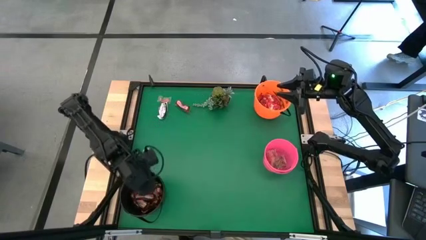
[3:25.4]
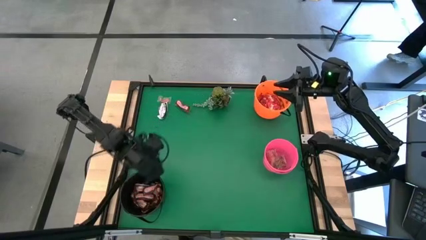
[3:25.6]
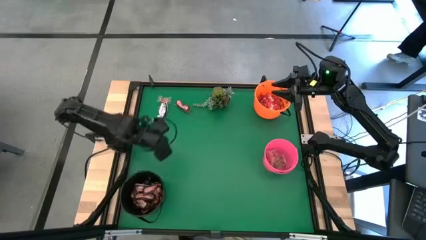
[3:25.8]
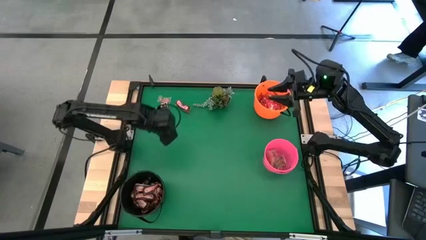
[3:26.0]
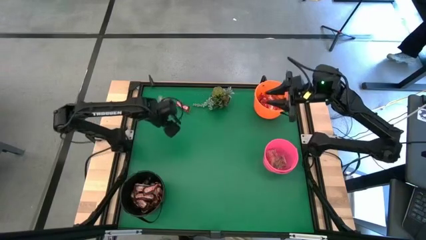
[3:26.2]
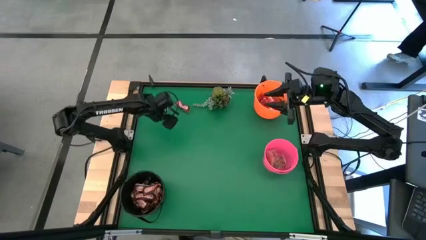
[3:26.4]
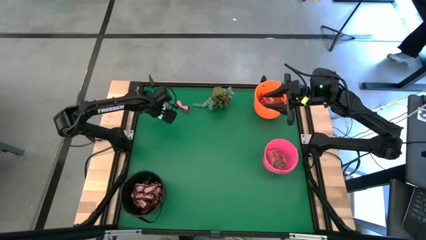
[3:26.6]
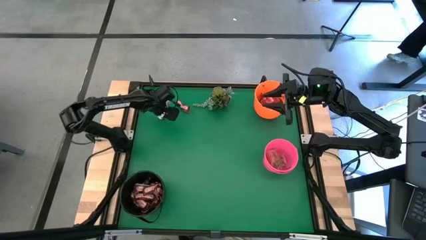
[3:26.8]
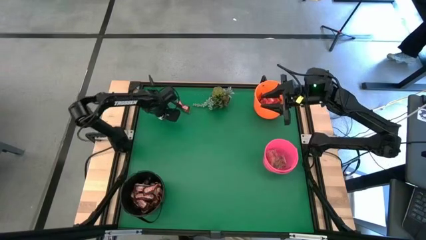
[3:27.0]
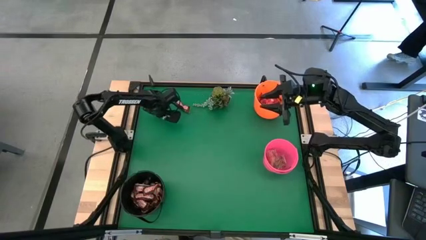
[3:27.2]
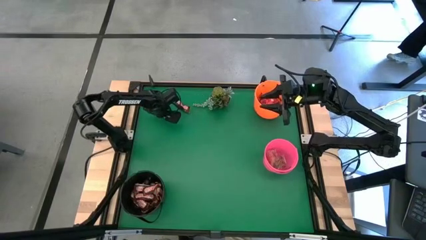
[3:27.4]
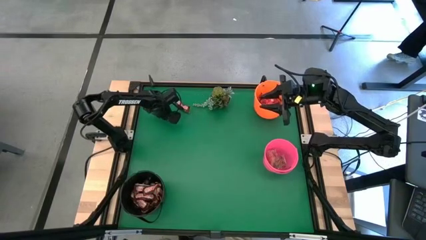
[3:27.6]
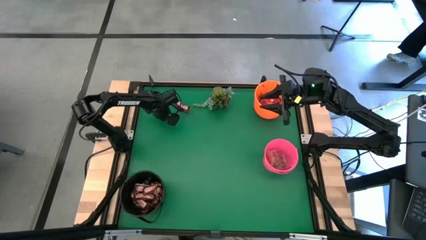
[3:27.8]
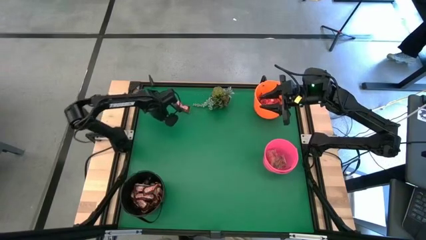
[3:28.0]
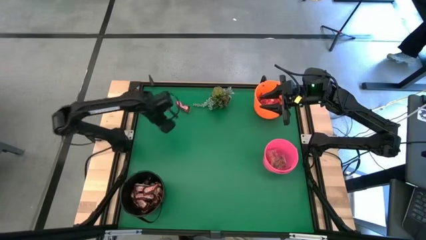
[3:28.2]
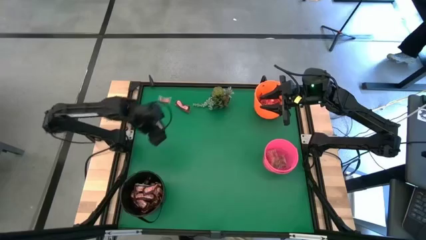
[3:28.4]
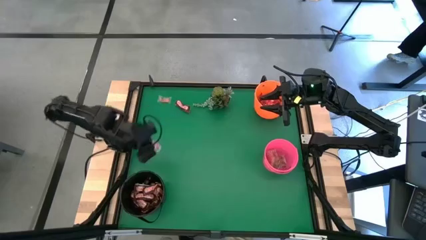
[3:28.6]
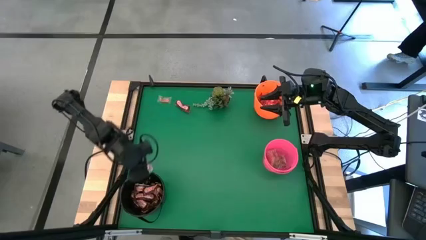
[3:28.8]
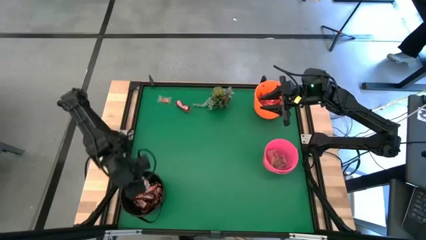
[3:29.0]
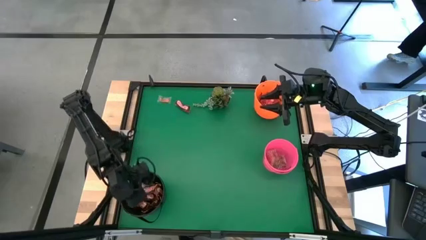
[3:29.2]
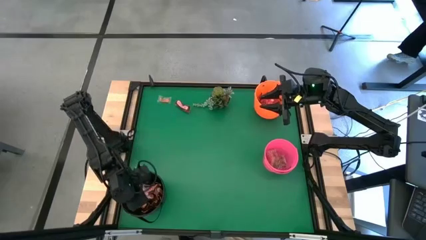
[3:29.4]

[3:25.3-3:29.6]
Task: Sort candy
Put the brown chocolate bar into the black bucket

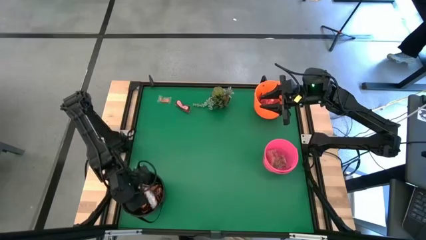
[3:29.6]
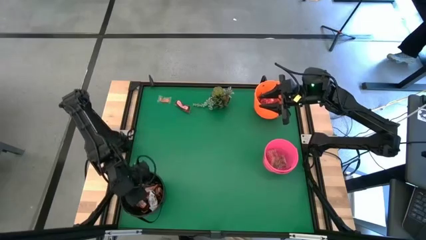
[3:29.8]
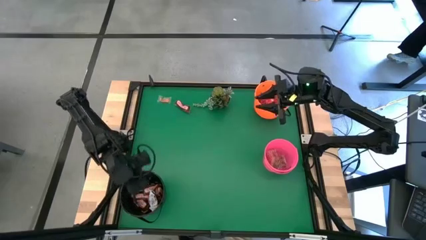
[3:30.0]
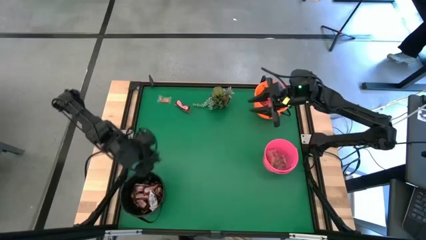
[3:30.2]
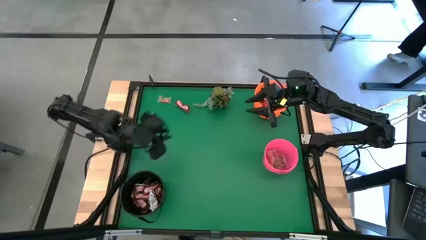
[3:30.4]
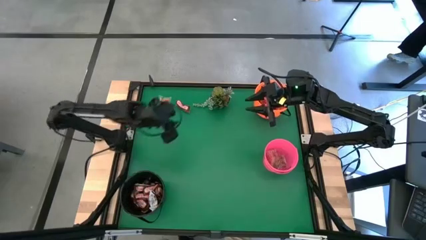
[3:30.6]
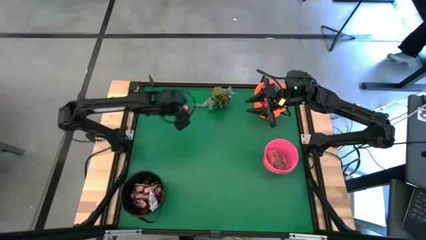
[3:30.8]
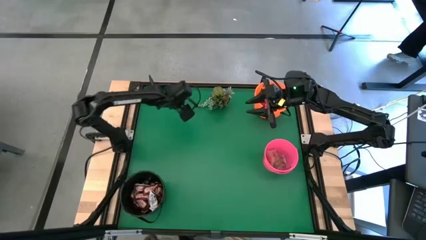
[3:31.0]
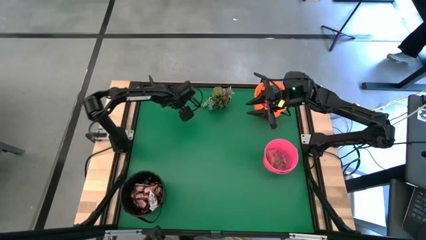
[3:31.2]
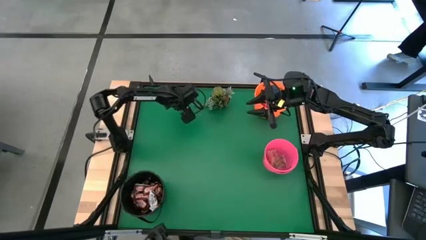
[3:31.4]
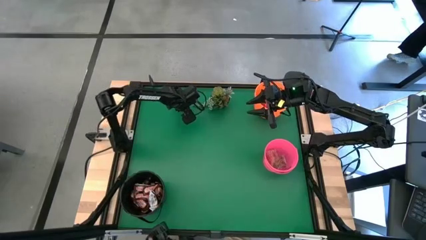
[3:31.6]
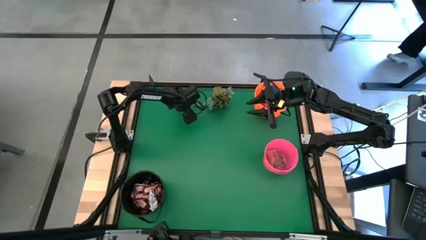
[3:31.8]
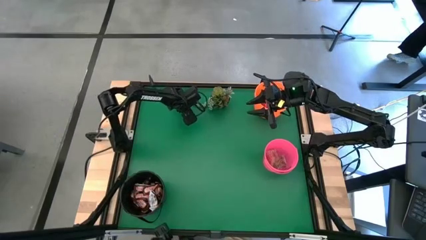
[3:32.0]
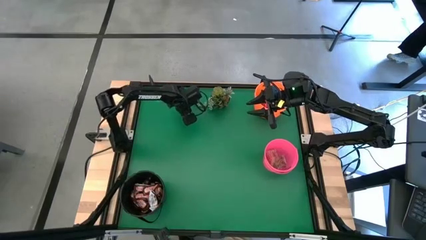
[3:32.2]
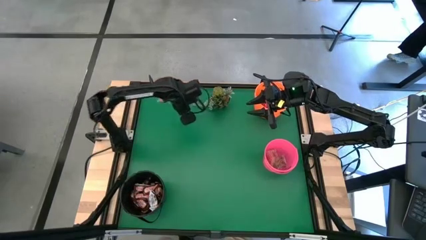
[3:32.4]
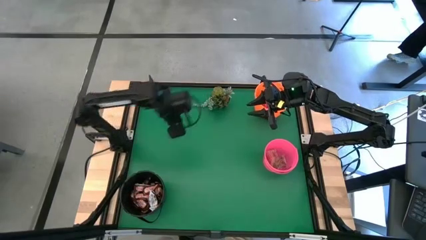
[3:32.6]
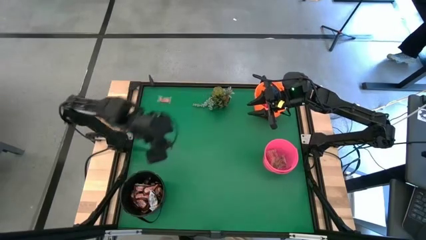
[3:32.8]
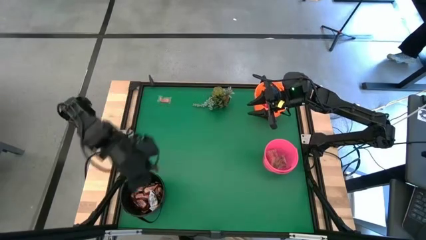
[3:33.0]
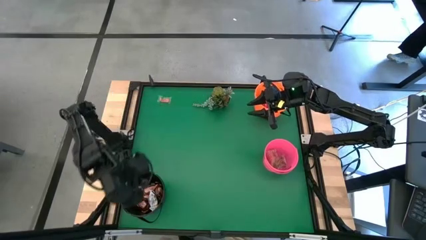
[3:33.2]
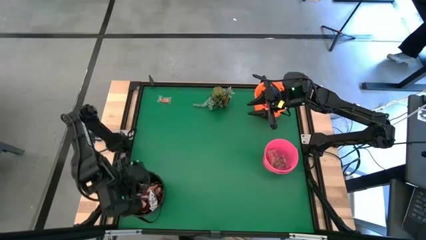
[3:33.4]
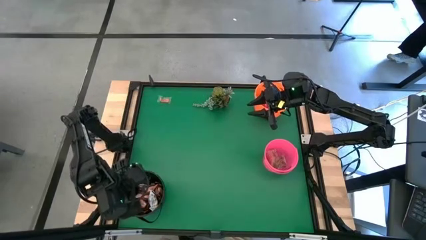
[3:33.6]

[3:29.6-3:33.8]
Put the brown chocolate bar into the black bucket

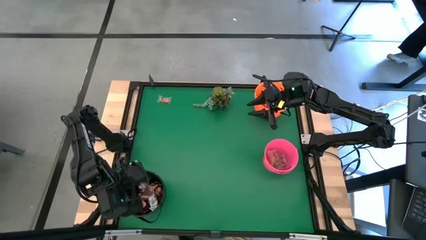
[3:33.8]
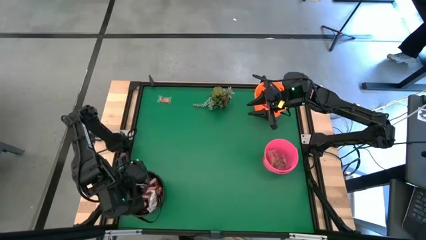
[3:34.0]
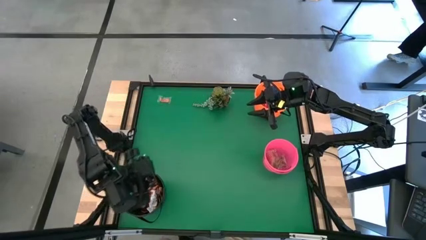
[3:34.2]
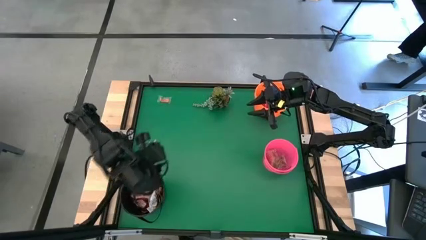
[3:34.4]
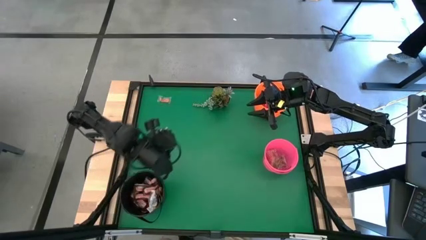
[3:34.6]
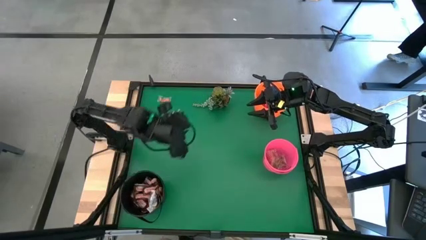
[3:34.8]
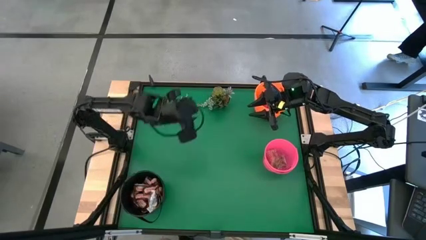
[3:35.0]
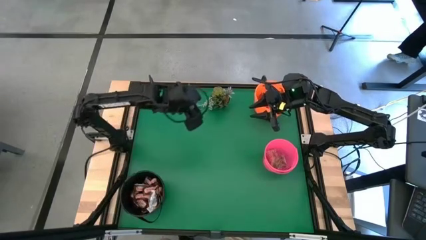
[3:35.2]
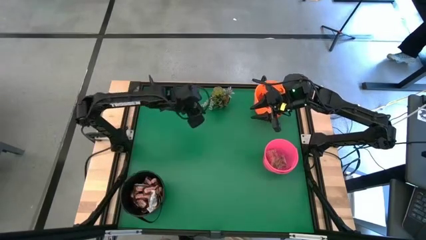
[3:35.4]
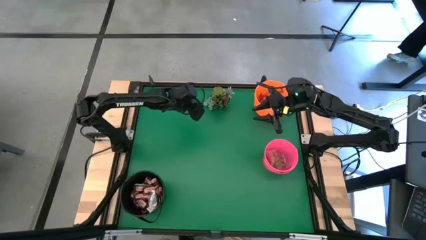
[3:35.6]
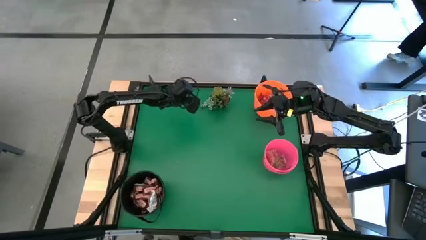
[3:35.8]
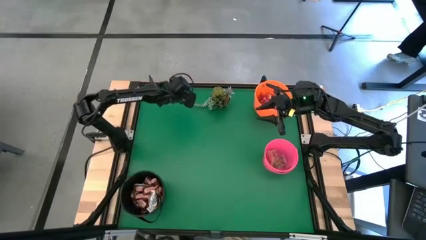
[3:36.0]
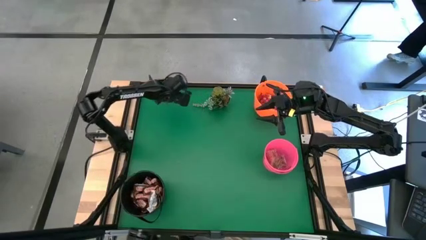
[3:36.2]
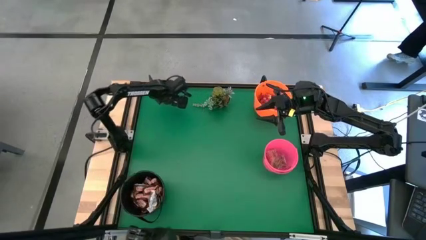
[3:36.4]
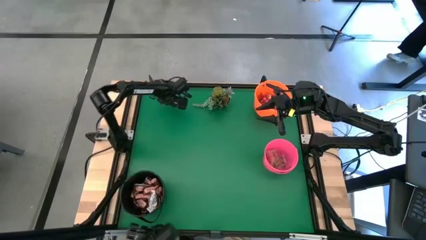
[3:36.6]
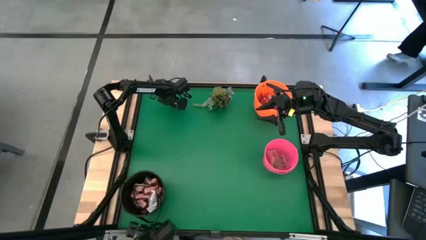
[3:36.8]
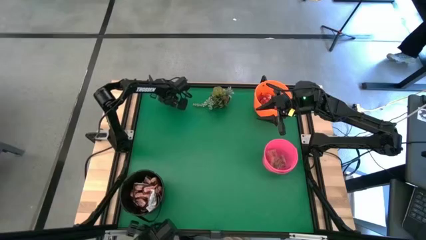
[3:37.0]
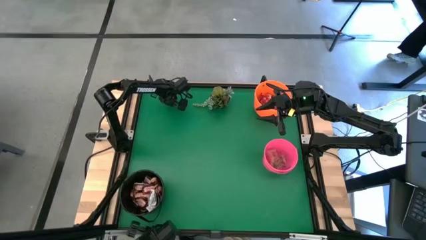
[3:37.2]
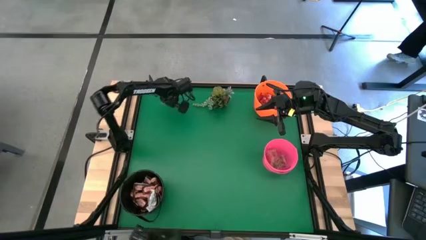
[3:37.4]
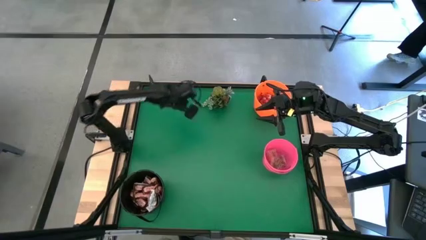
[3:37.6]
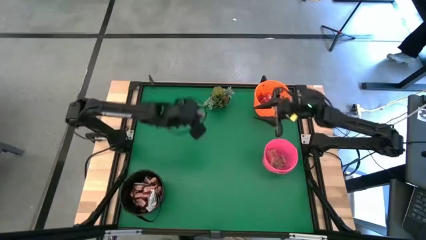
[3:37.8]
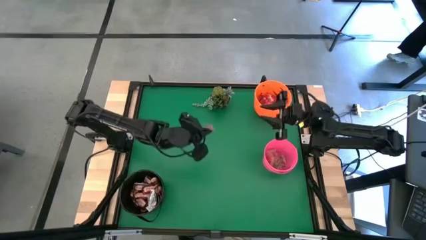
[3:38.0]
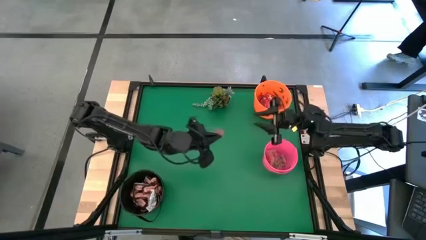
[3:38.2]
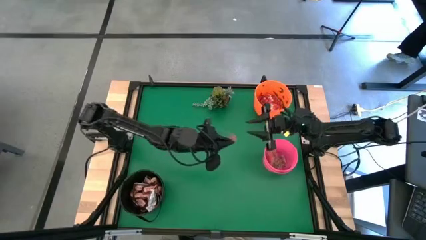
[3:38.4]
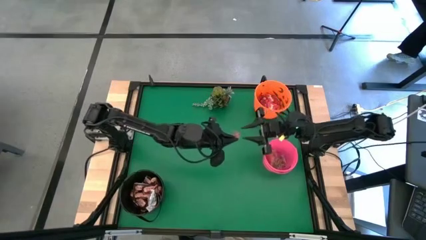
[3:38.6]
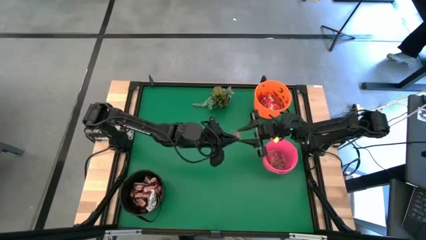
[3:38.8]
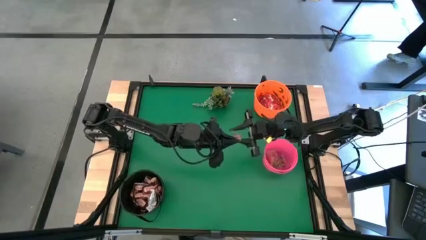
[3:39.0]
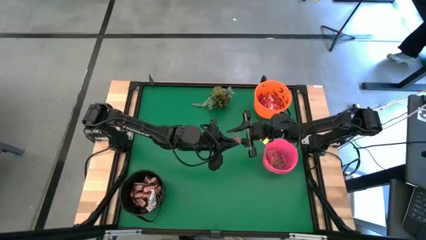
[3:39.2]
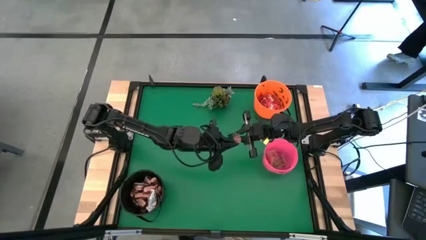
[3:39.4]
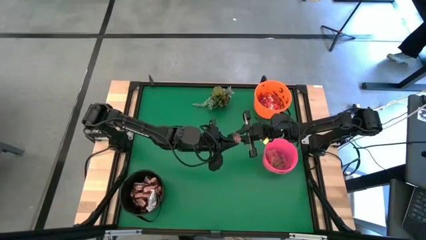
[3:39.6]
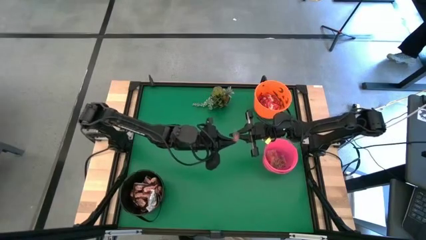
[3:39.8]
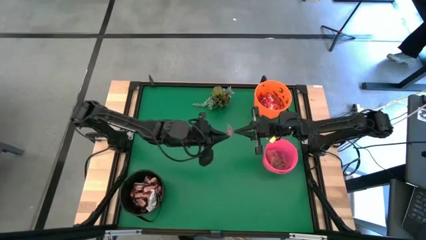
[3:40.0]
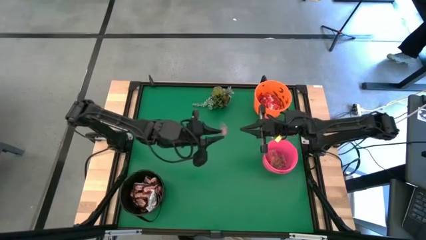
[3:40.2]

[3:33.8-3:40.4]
Put the orange candy into the pink bucket

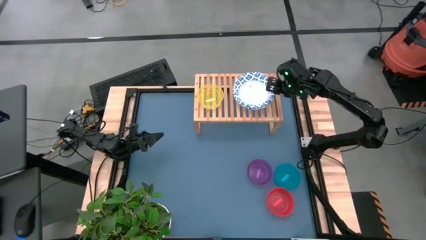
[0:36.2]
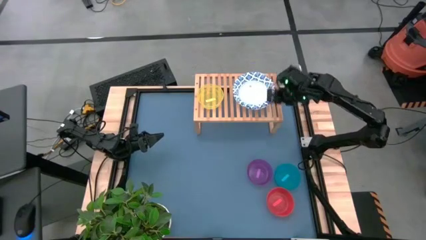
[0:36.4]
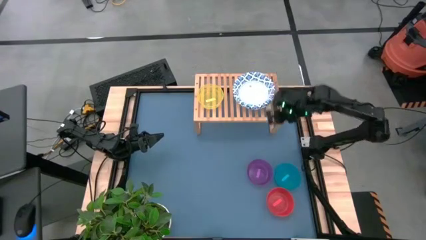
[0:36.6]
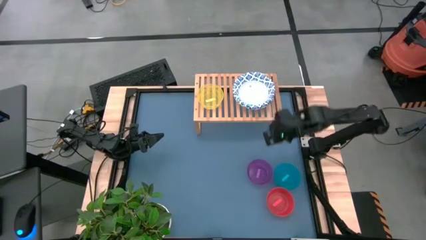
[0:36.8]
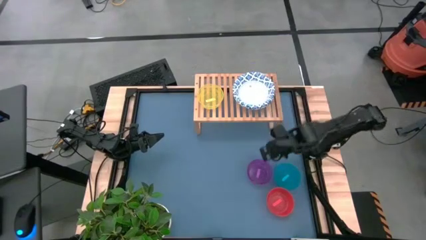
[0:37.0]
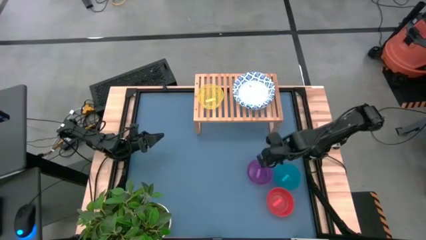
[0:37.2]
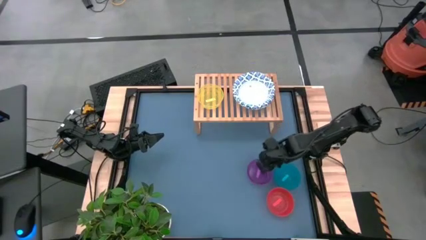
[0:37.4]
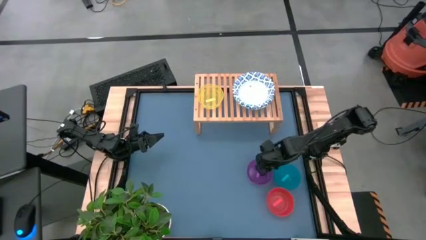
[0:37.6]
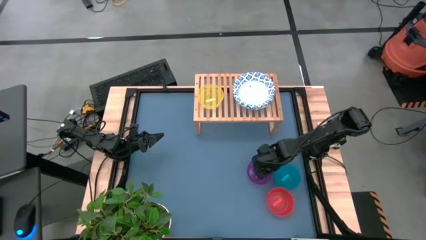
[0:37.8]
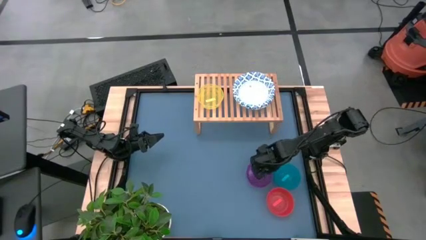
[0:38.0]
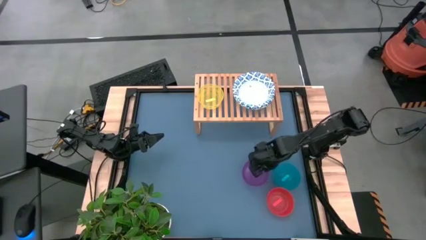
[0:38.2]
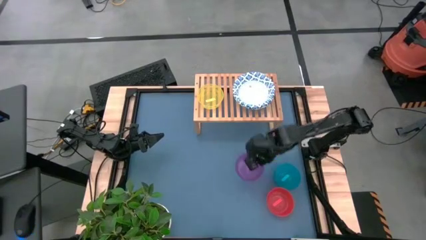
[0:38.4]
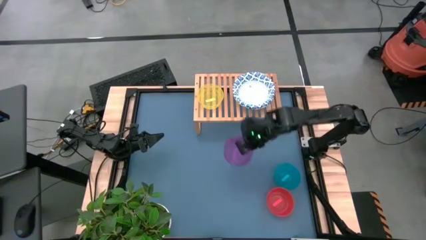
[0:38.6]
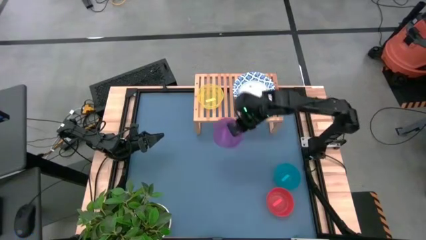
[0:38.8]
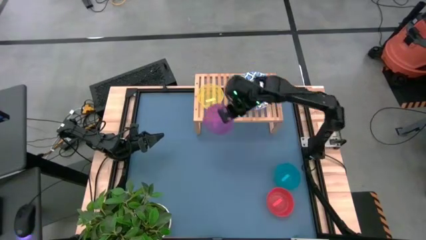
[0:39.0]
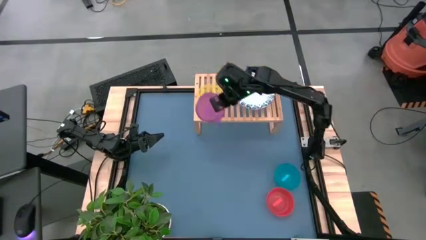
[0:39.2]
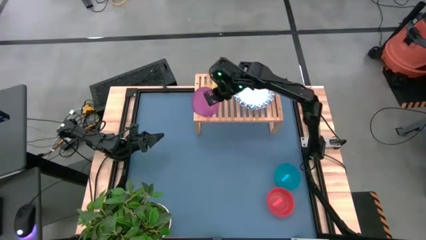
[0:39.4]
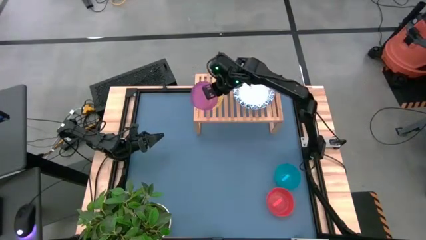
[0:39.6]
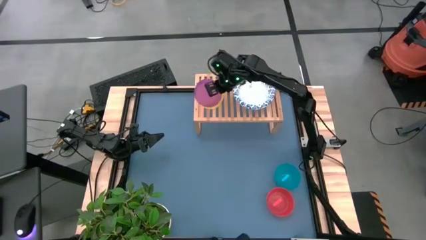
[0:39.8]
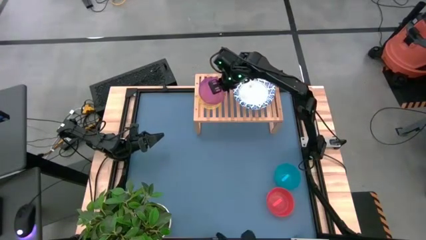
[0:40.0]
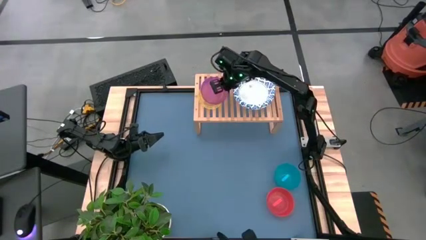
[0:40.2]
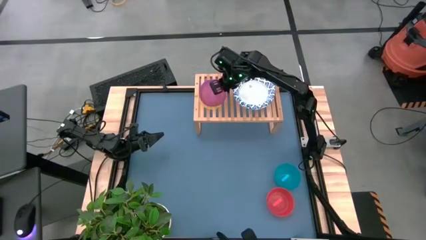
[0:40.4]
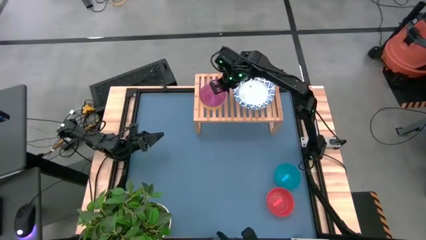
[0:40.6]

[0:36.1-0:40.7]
Task: Place and stack bowls onto a shelf
Stack the purple bowl on top of the yellow bowl on the shelf
